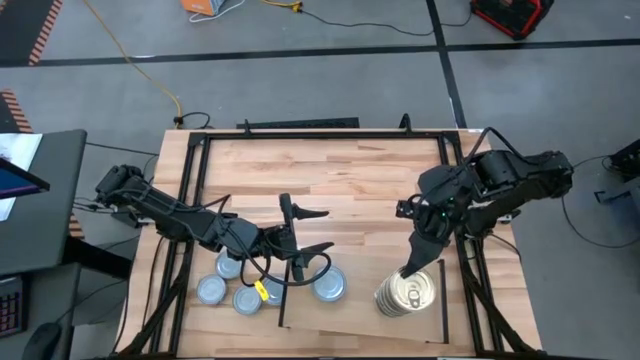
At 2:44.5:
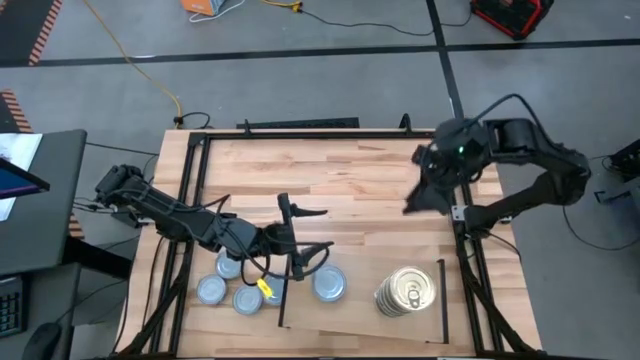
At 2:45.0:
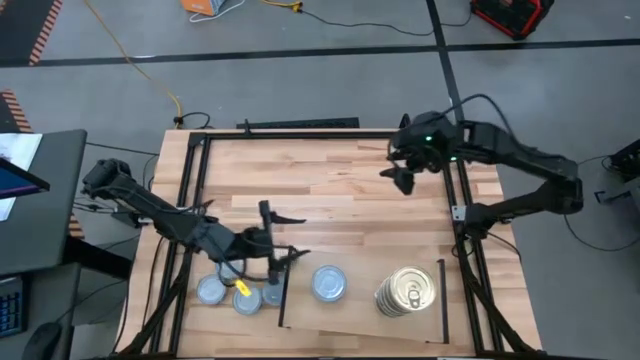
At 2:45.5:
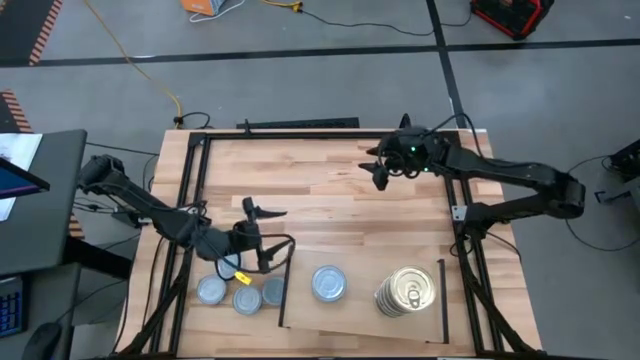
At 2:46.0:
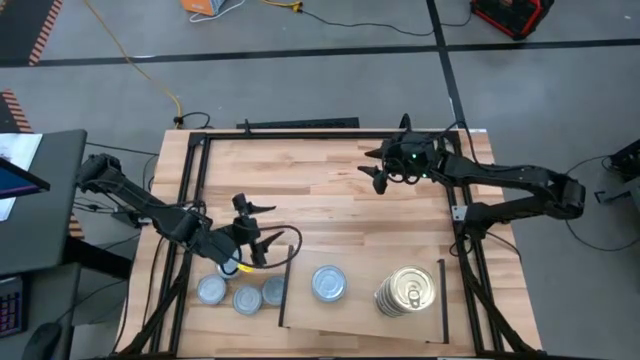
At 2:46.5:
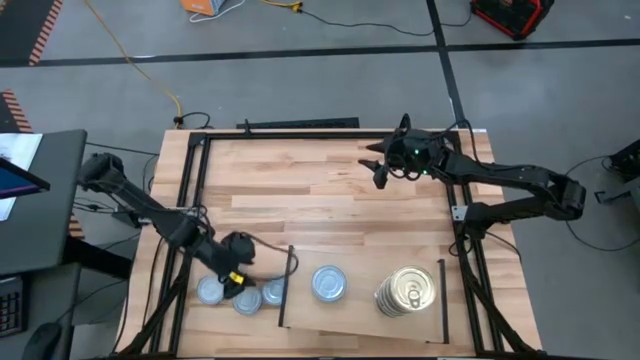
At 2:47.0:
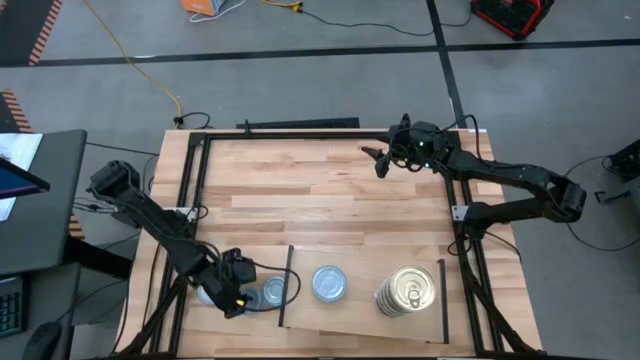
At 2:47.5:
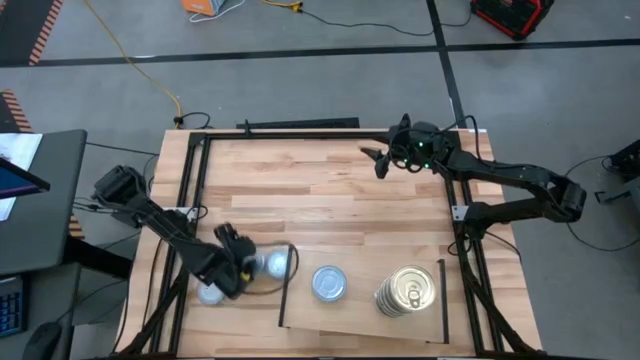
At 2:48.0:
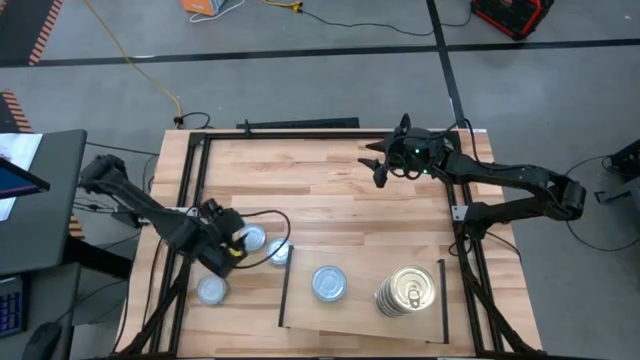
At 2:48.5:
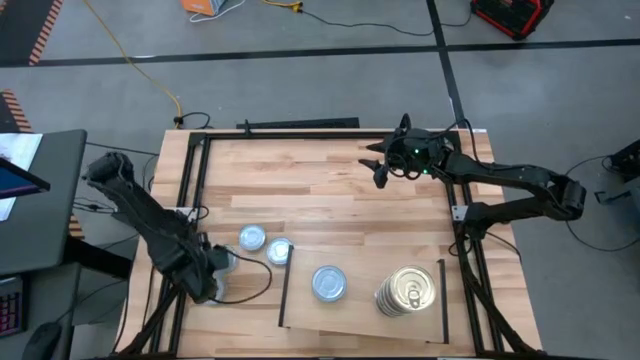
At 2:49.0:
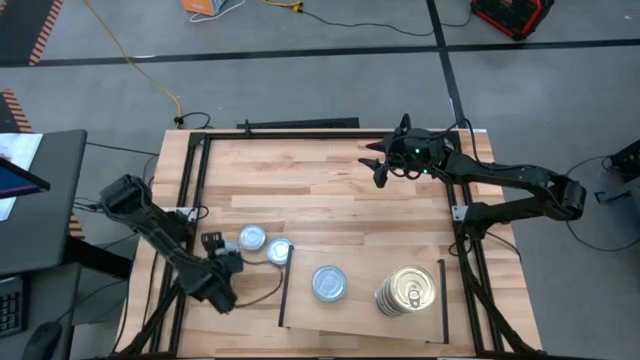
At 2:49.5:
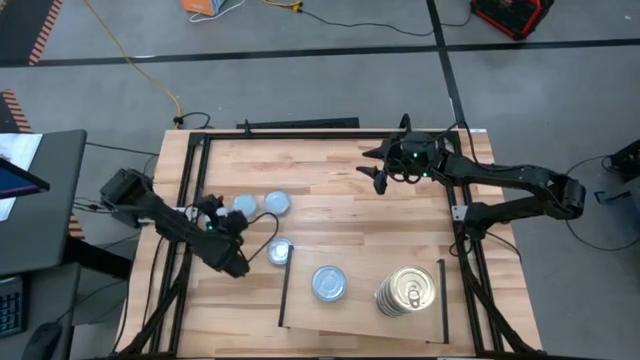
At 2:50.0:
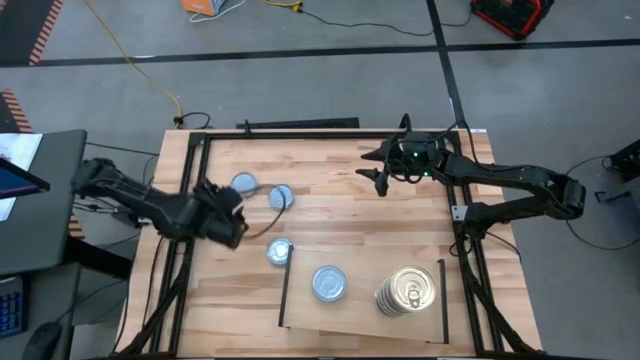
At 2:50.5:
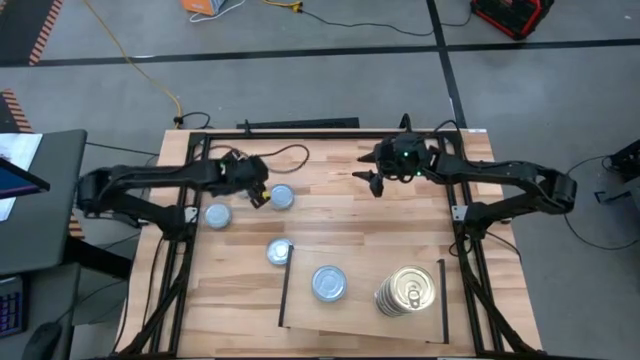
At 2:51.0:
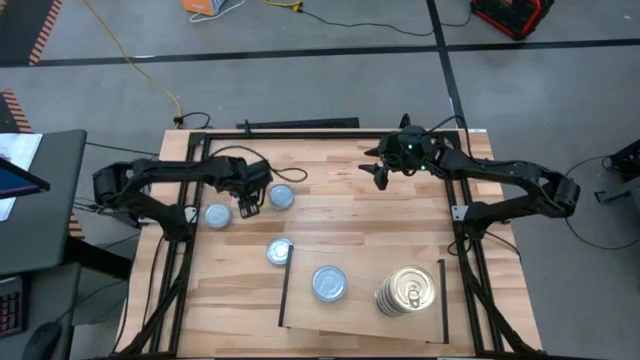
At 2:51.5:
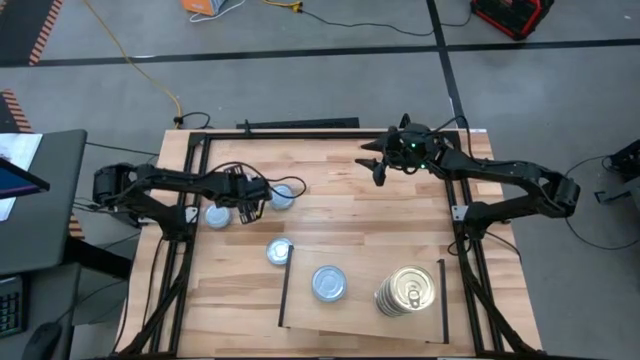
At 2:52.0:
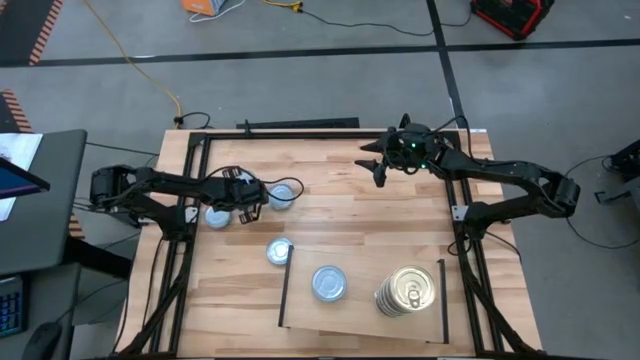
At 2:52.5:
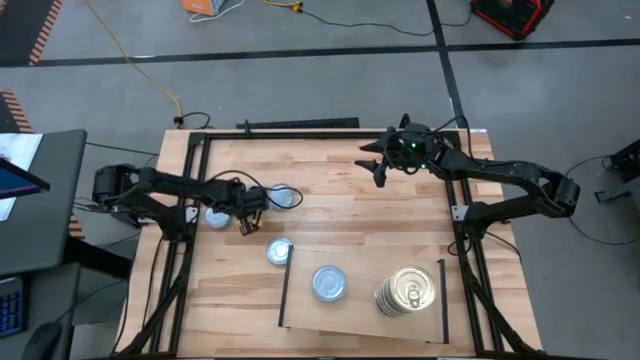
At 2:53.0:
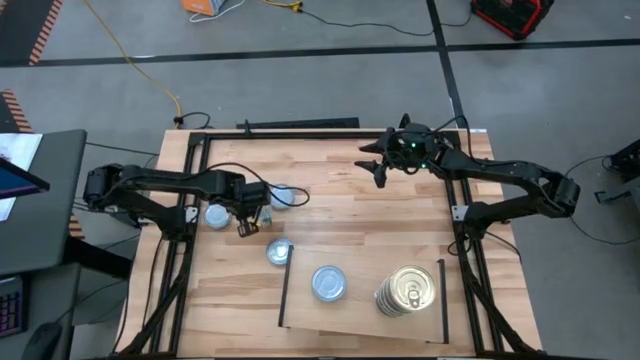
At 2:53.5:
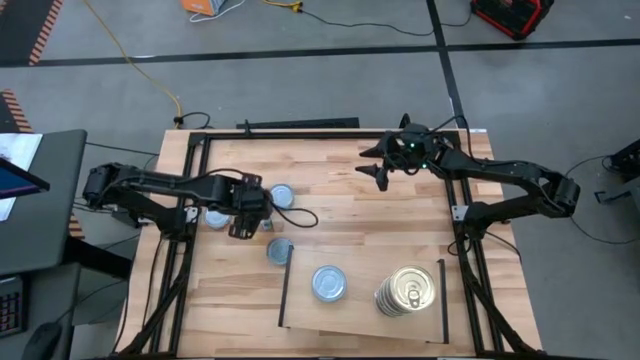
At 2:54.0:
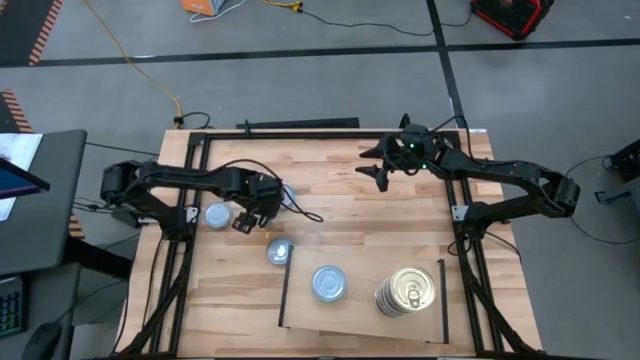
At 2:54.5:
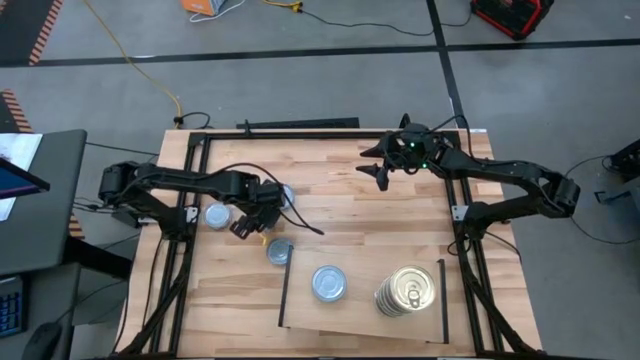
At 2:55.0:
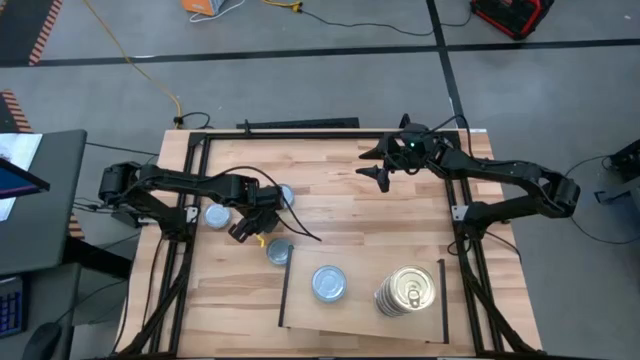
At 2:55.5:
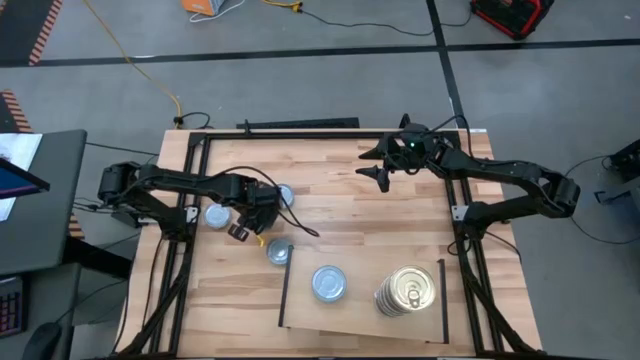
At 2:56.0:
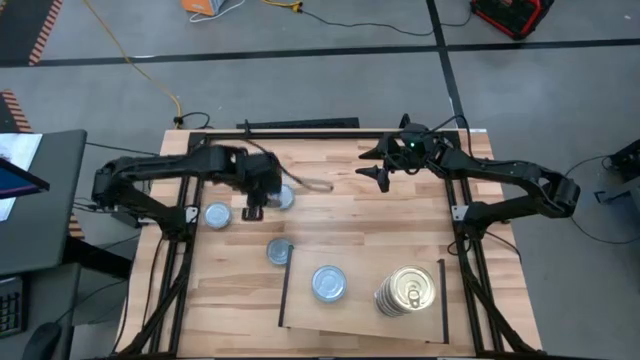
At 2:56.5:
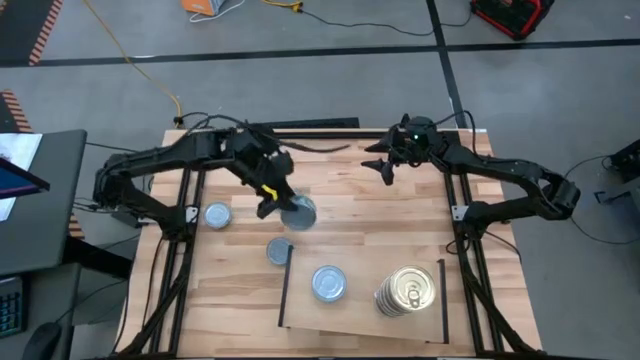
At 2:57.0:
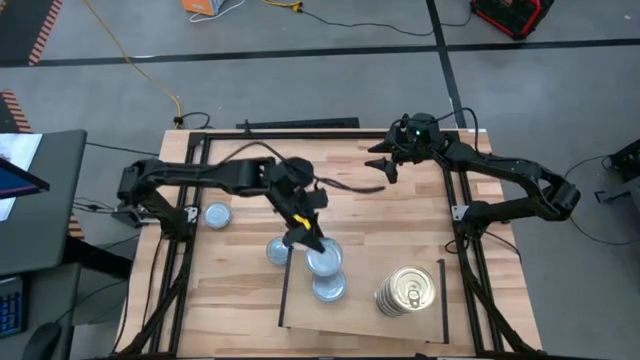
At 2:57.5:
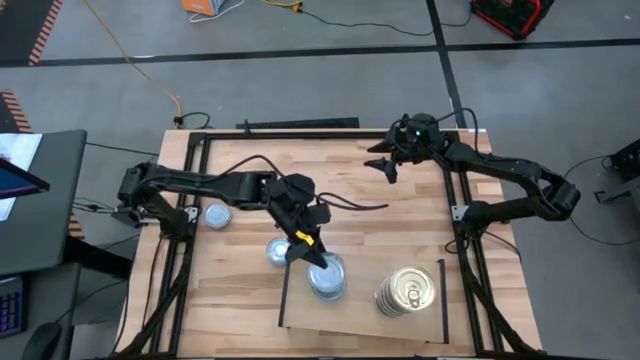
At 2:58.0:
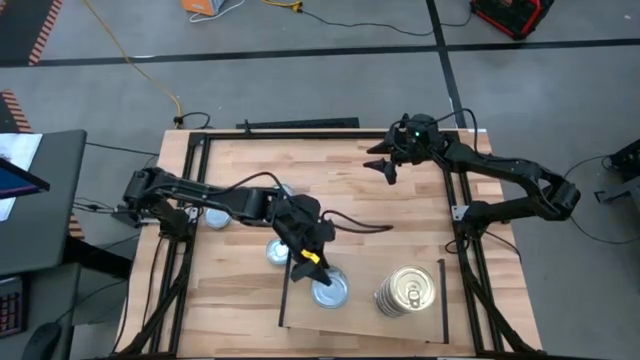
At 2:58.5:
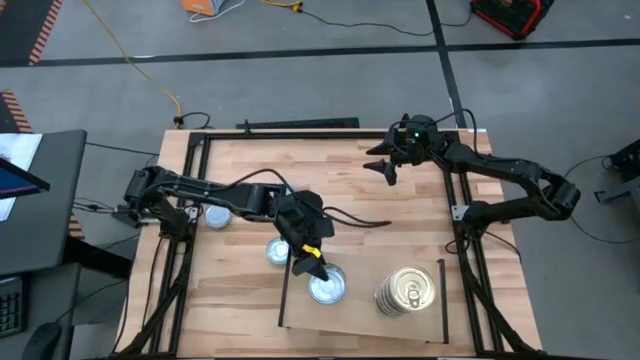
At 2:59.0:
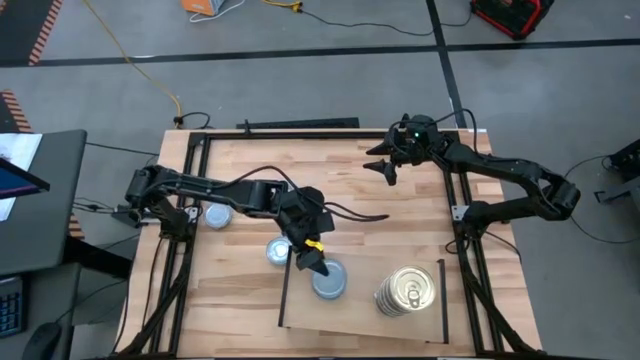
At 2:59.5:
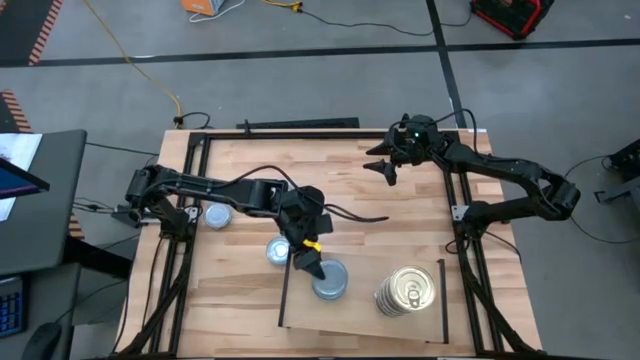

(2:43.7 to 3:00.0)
Task: Stack canned seafood by type on shelf
Stack the green tuna can on the top of the green tuna cans on the shelf

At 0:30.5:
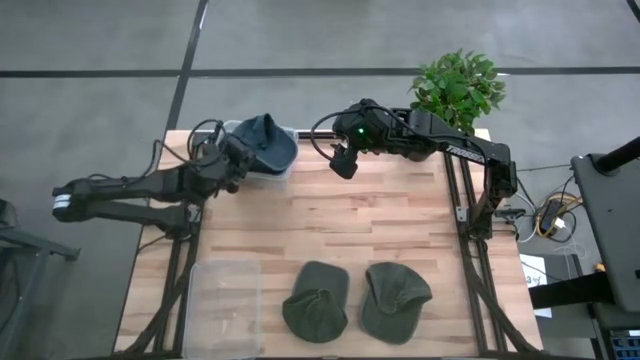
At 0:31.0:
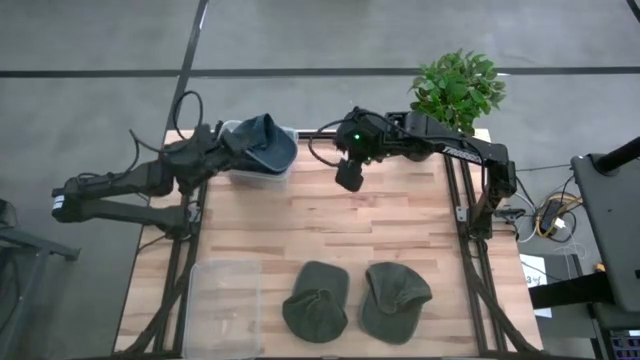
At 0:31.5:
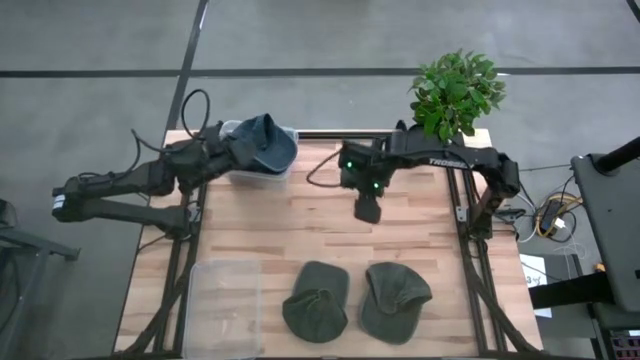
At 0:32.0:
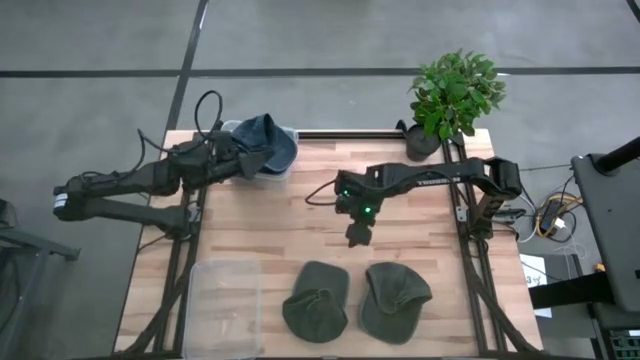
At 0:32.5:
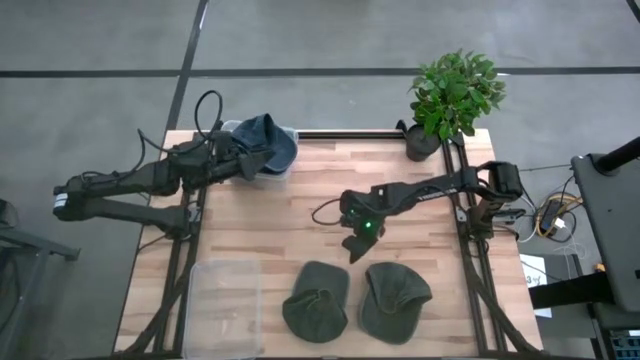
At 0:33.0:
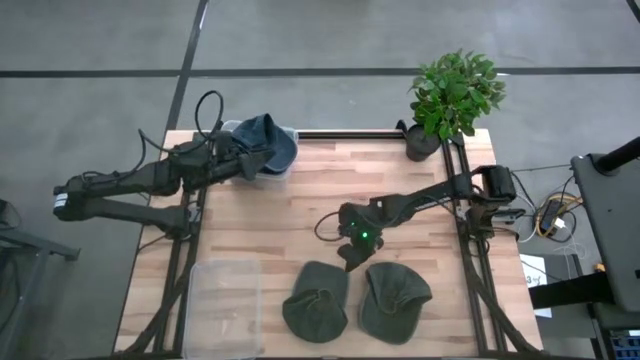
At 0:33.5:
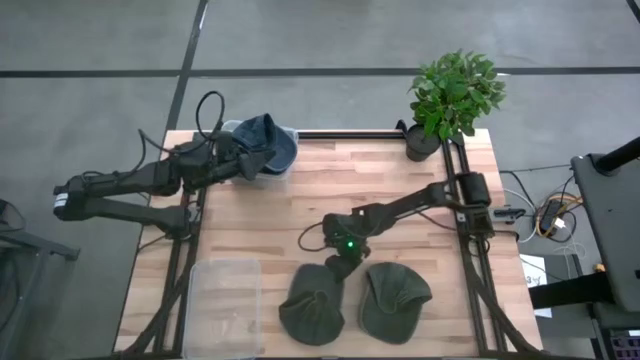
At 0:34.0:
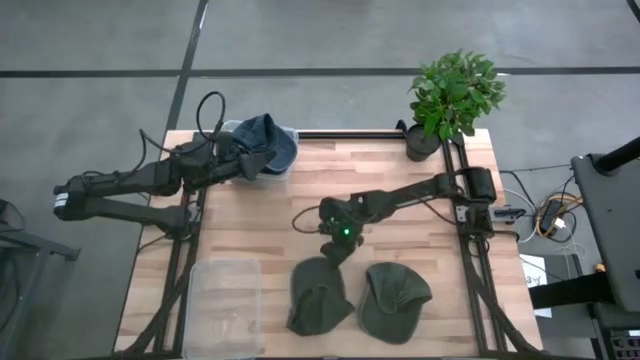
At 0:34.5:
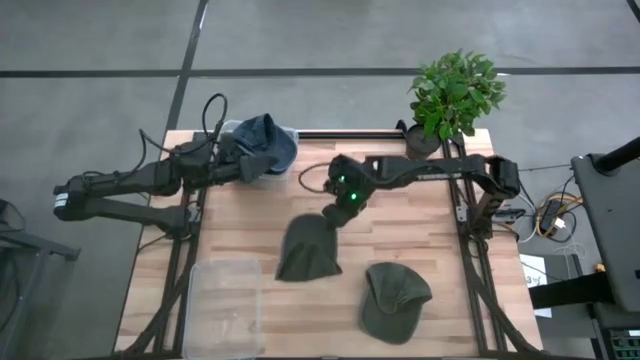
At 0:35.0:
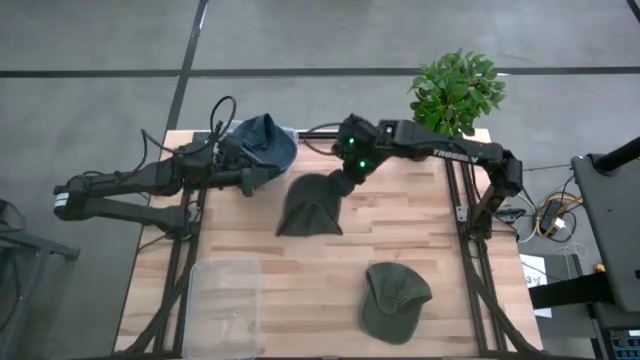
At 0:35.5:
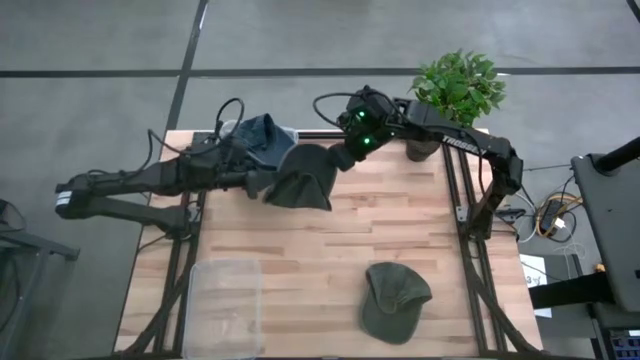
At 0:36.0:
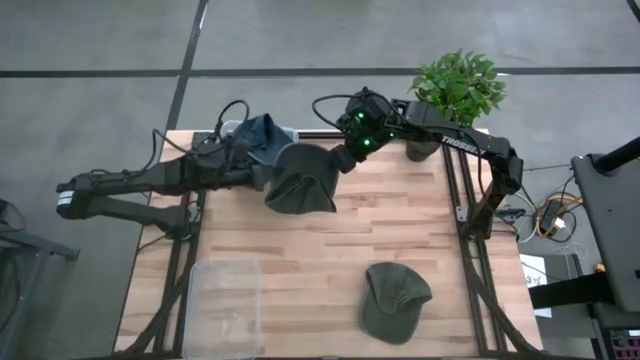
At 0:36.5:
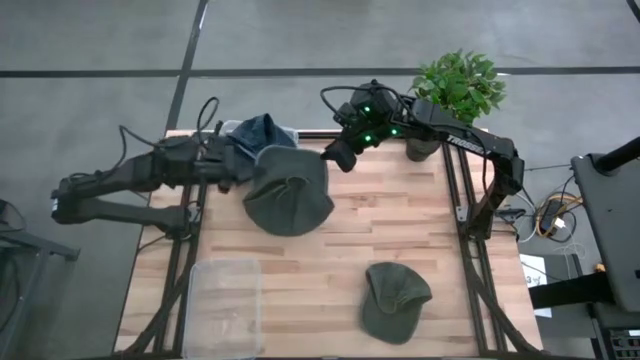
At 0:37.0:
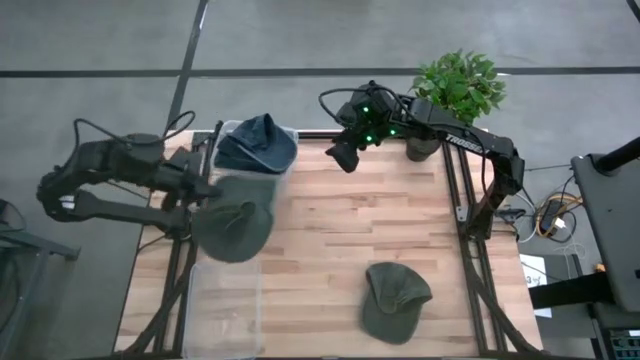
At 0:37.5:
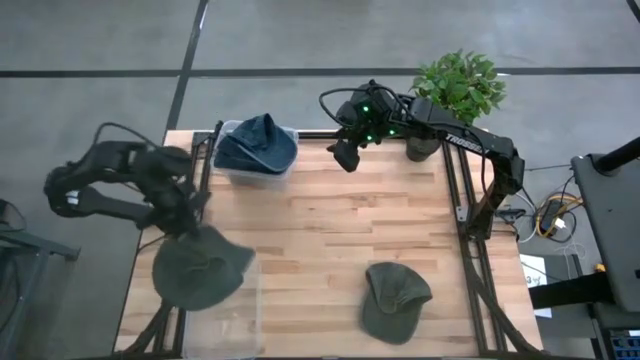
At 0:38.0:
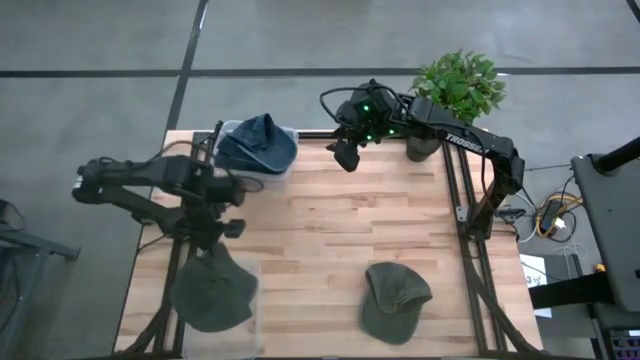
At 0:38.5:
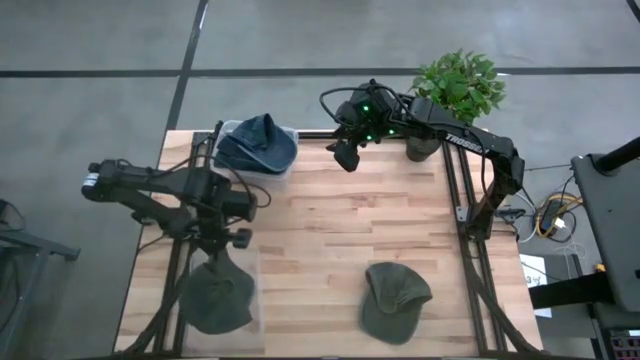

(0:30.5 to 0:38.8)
Task: Pick & Place hat
Put the left green cap into the bottom transparent bin
